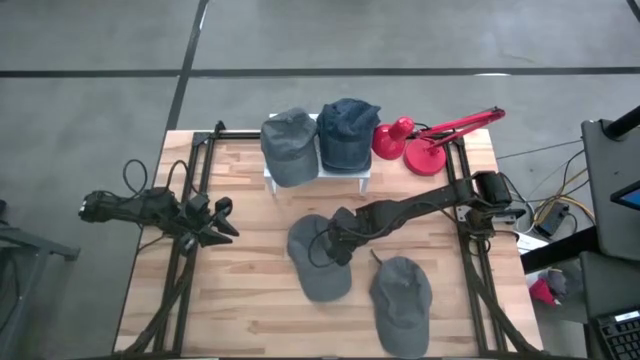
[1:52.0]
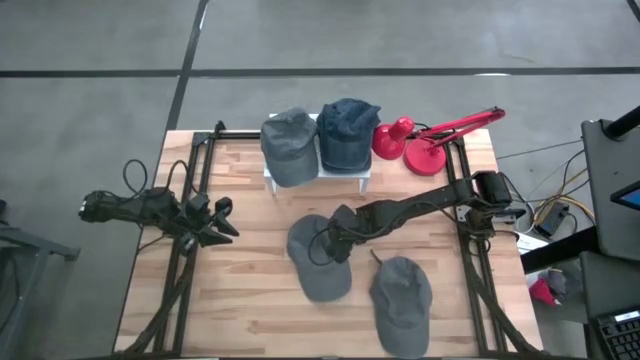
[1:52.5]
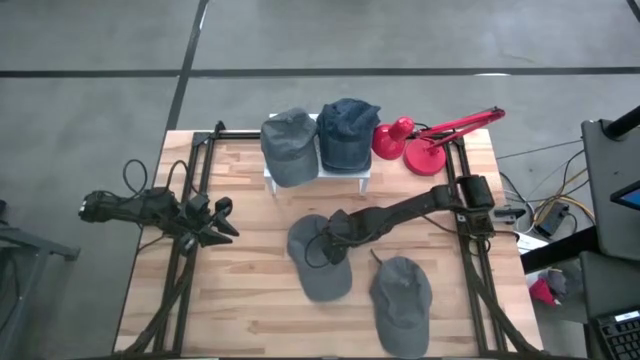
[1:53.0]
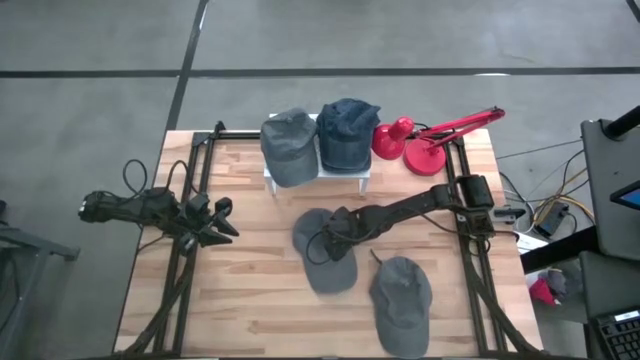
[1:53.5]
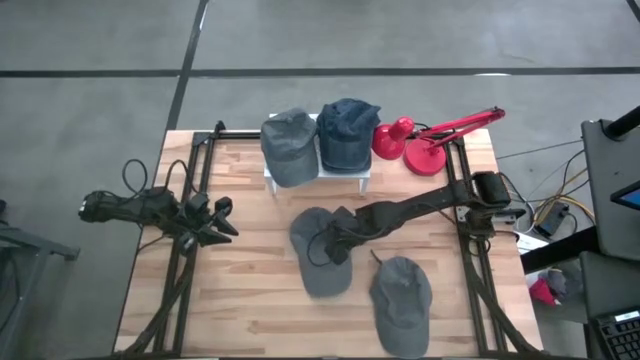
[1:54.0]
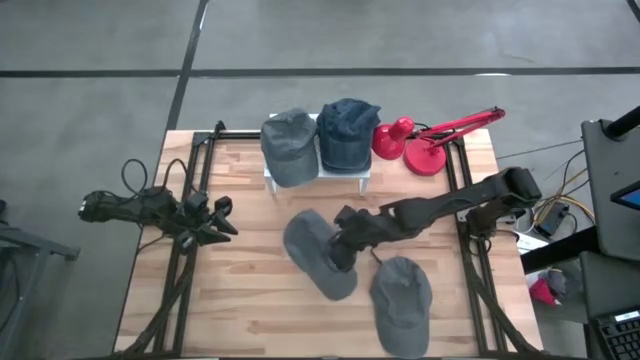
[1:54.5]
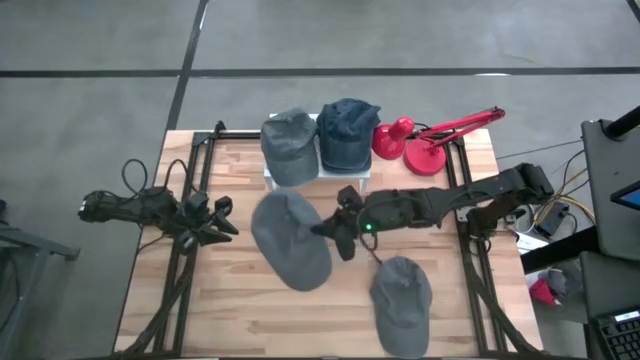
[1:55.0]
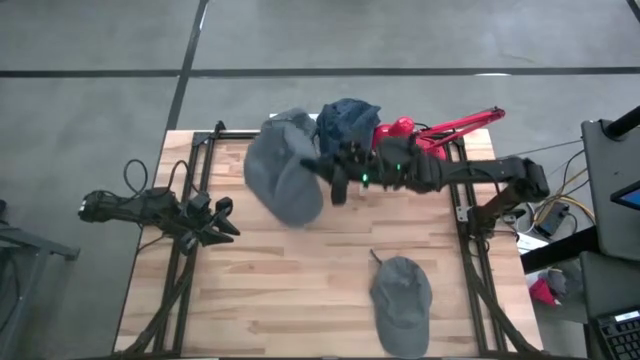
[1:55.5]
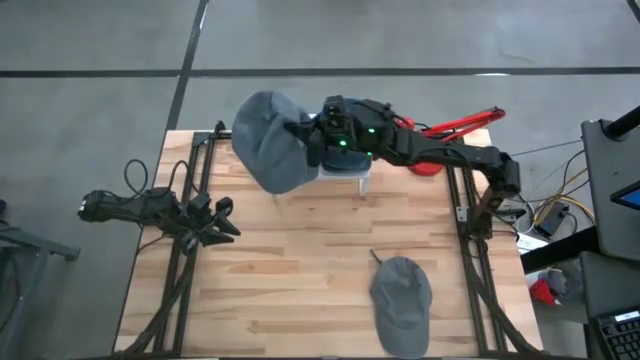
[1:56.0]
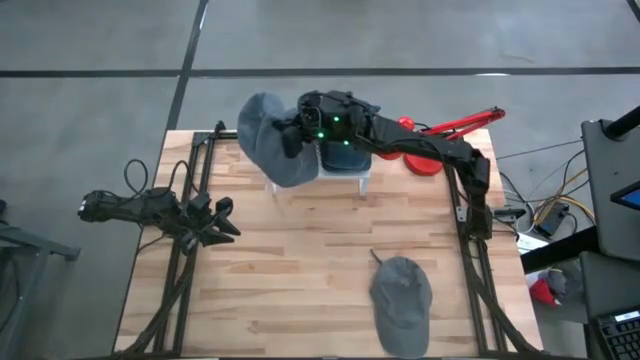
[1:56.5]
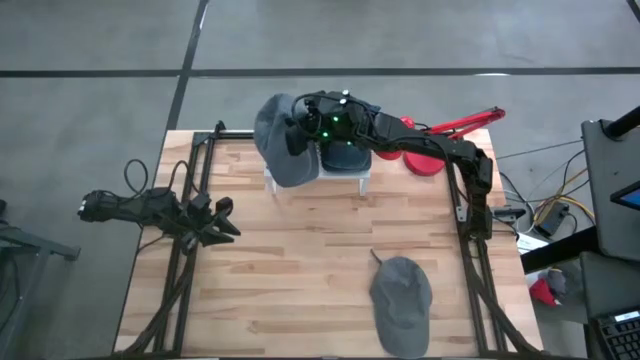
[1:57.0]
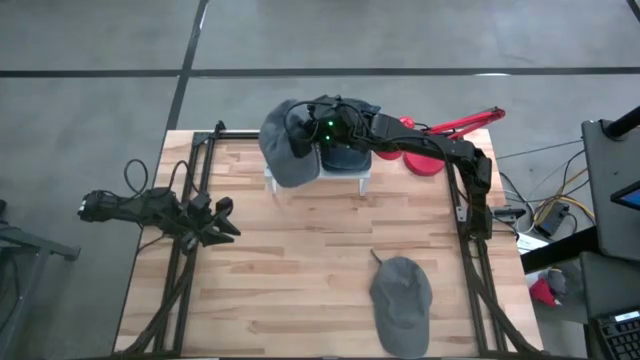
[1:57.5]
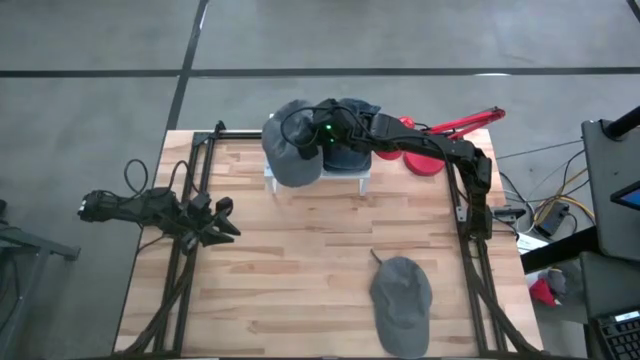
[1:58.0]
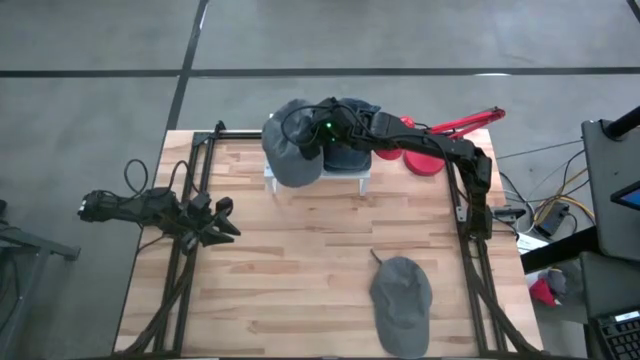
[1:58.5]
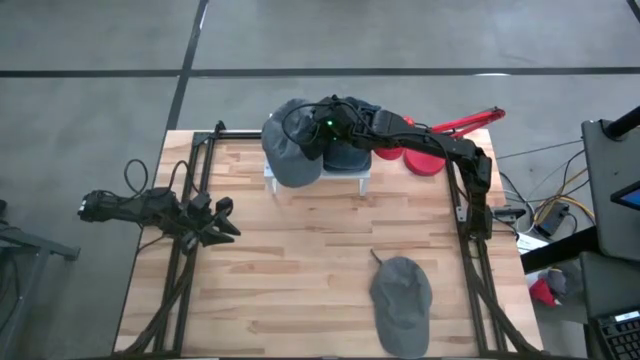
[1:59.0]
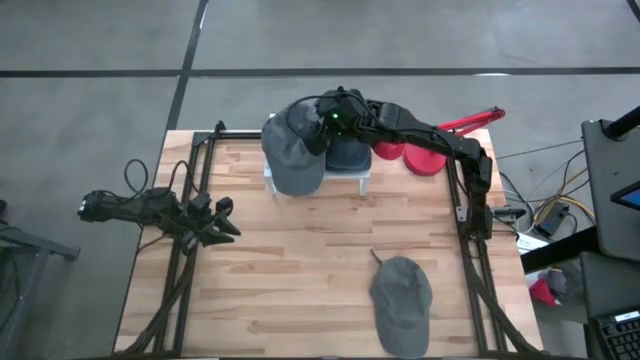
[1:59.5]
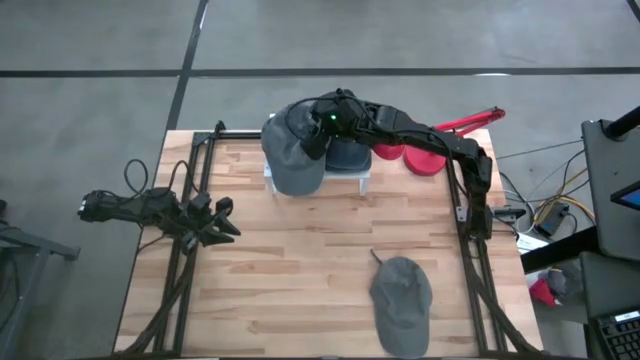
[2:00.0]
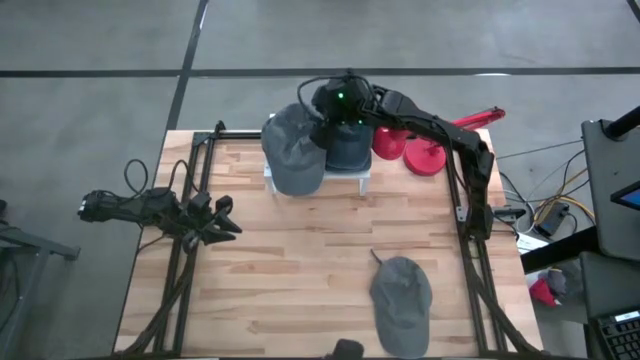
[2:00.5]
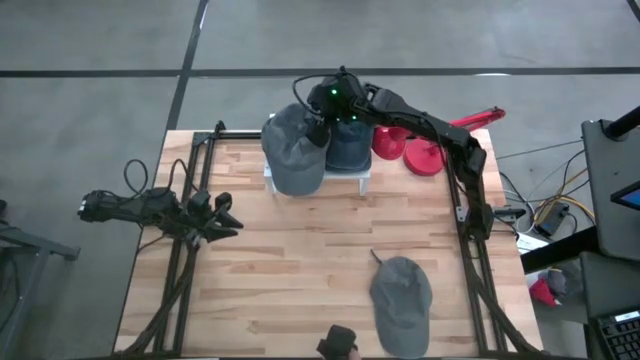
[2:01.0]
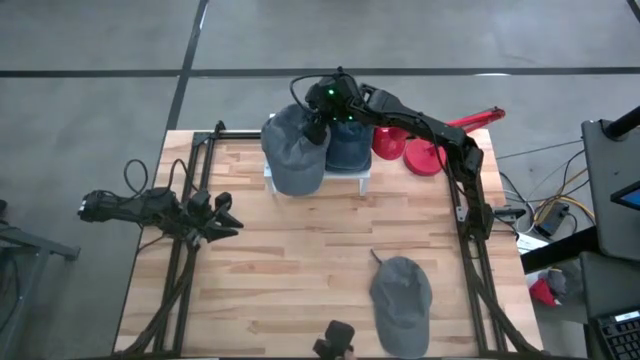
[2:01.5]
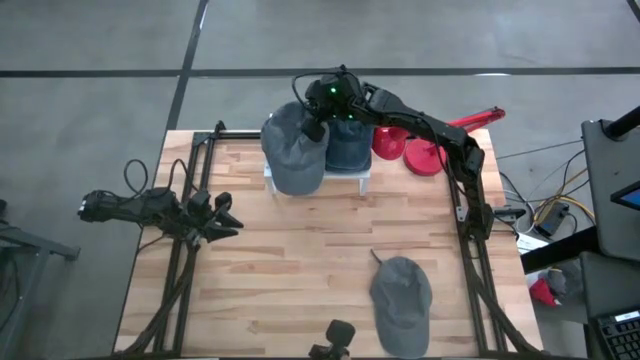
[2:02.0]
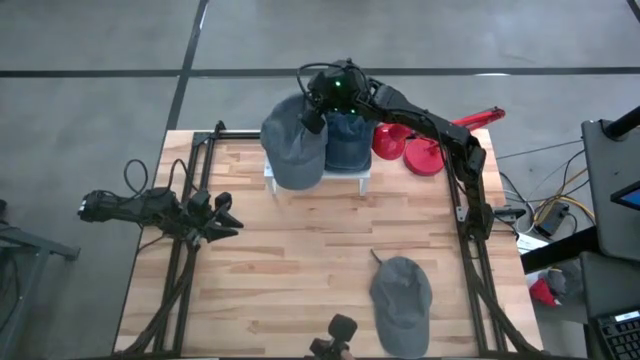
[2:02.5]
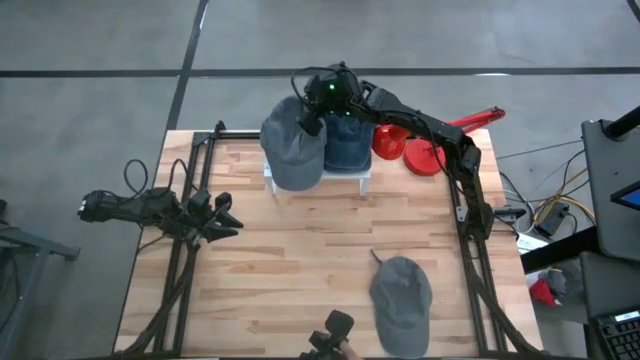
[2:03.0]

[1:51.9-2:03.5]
Task: Pick & Place hat
Stack the top gray cap on top of the gray cap on the shelf

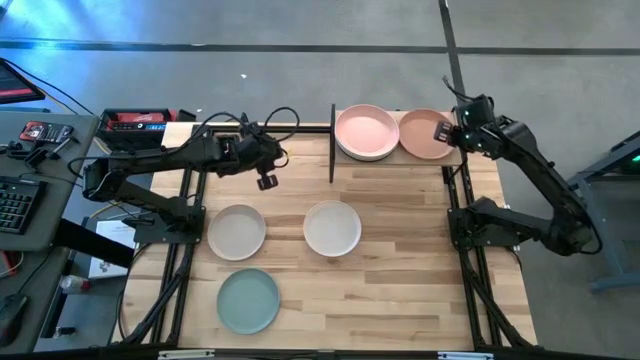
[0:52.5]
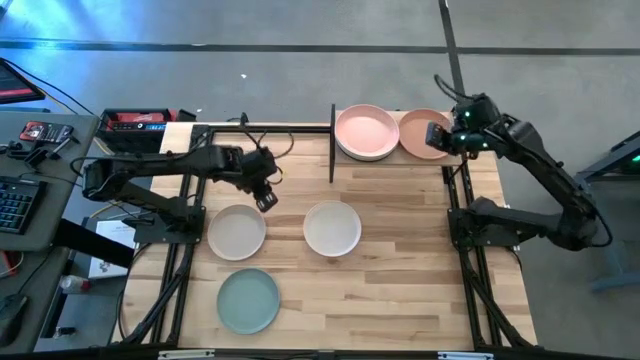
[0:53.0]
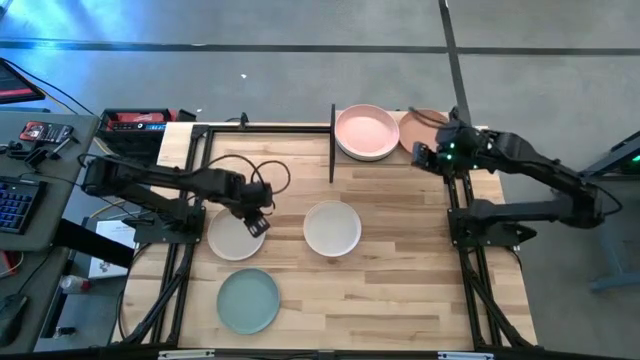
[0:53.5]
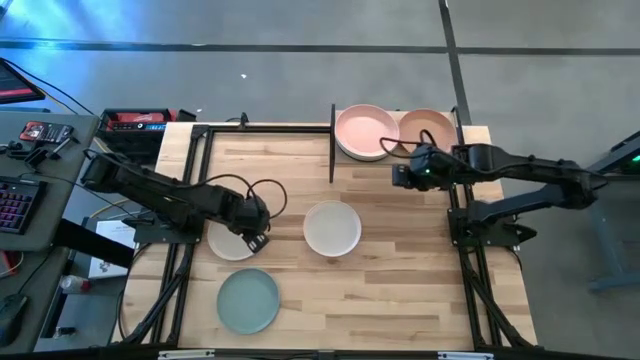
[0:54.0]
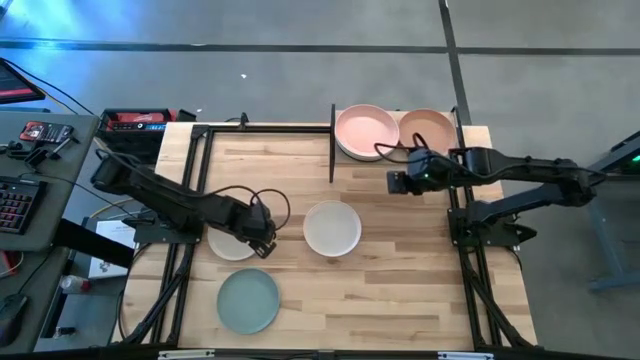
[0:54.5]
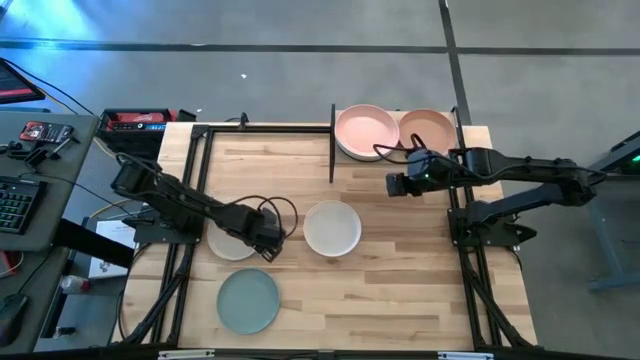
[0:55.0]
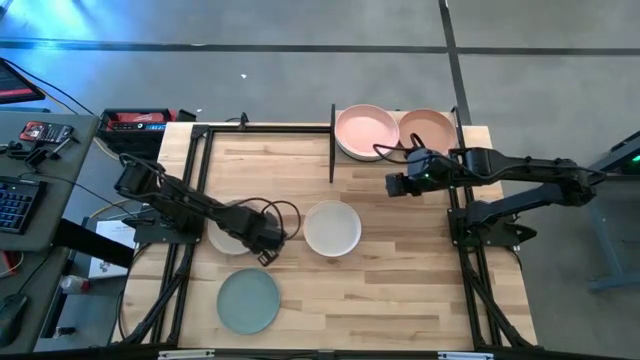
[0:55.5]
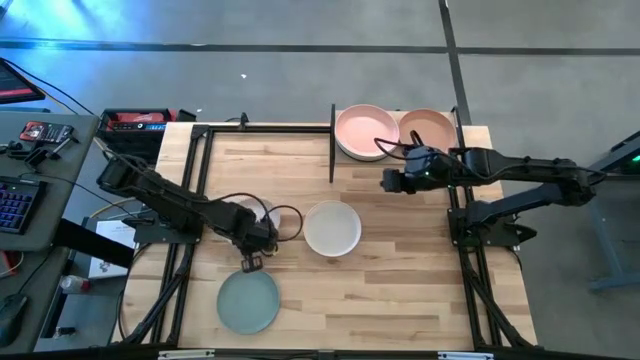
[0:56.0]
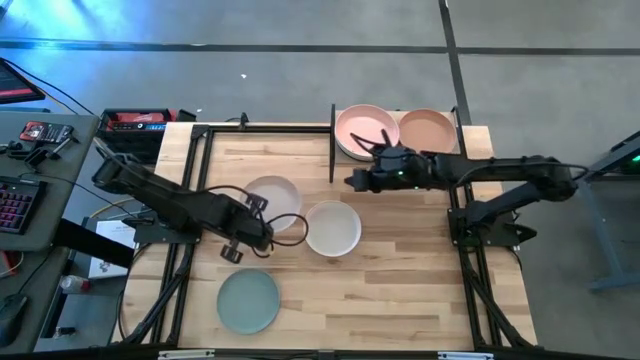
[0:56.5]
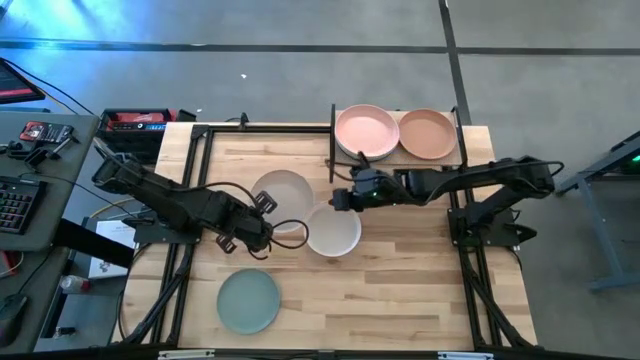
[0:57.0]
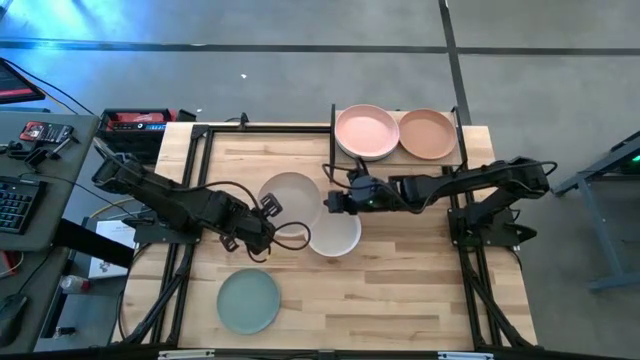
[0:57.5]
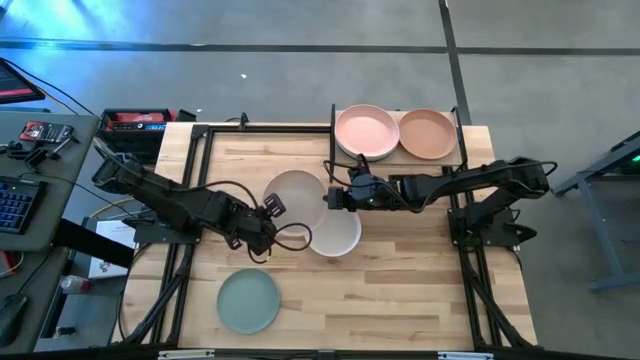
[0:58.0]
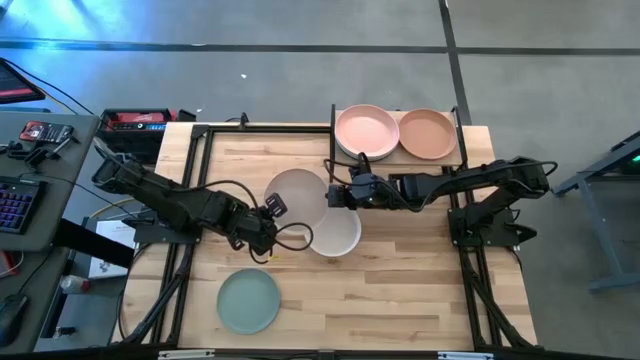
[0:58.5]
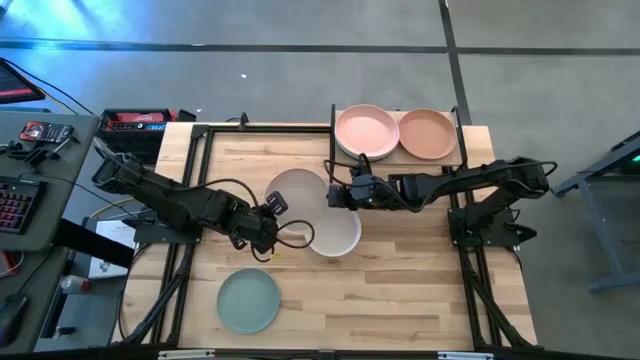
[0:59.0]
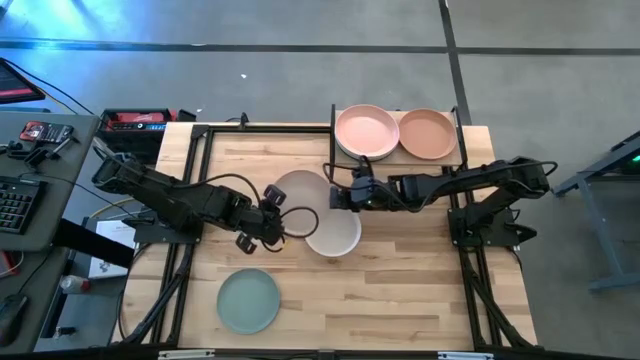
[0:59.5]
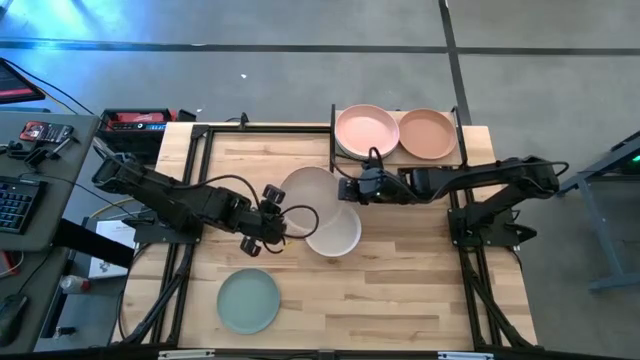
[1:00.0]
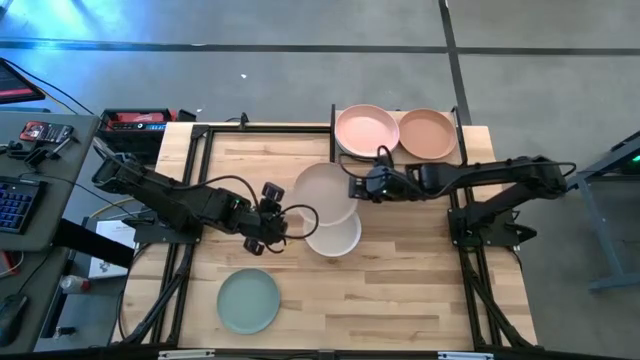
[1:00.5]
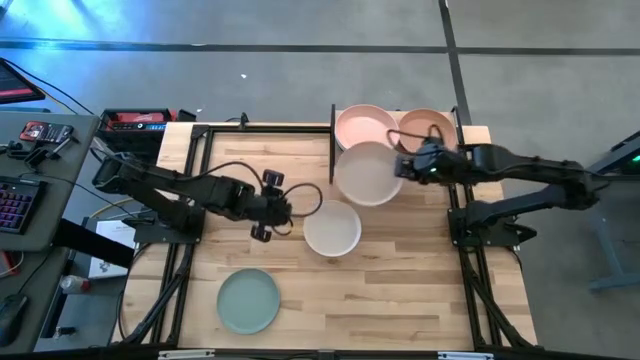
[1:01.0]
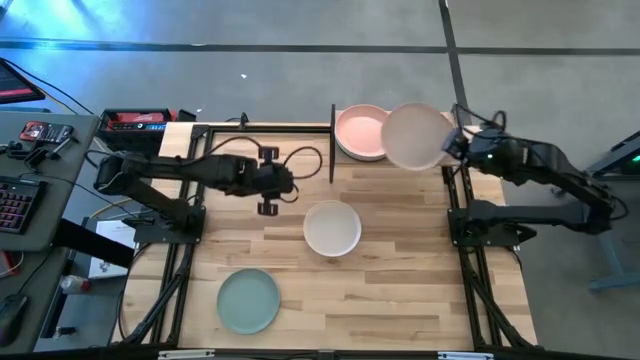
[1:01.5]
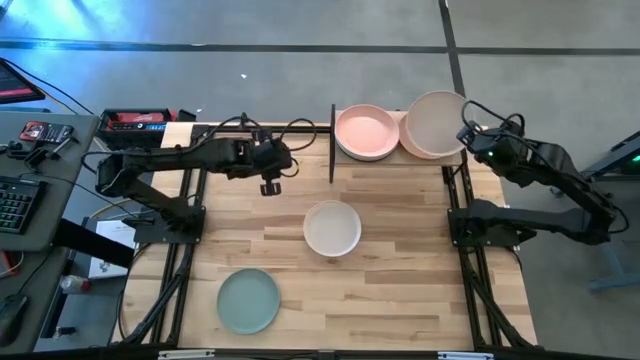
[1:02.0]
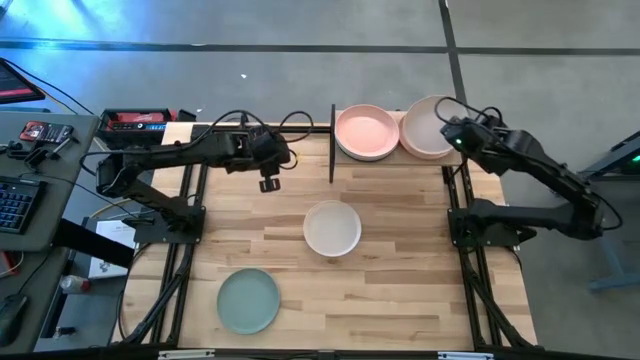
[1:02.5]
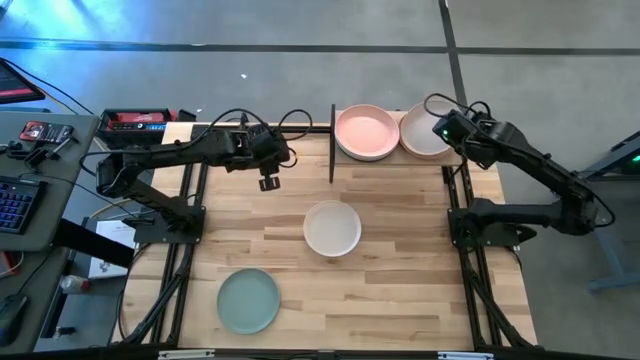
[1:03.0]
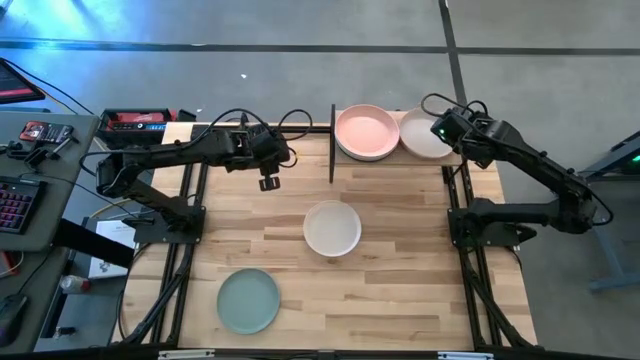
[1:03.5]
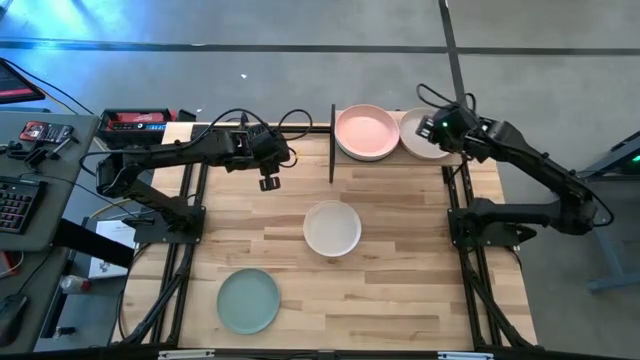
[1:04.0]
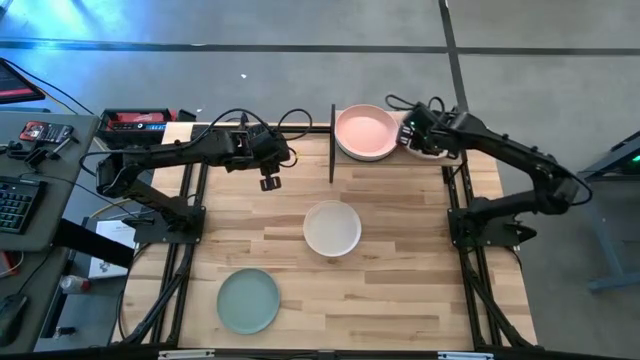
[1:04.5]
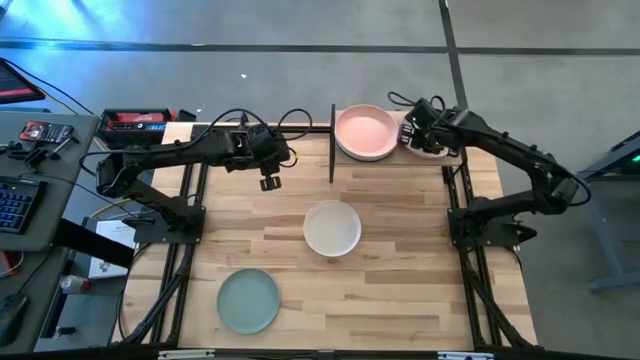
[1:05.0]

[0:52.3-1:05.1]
Task: Place and stack plates onto a shelf
Stack the gray plate on top of the brown plate on the shelf
